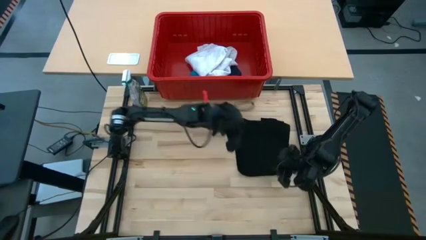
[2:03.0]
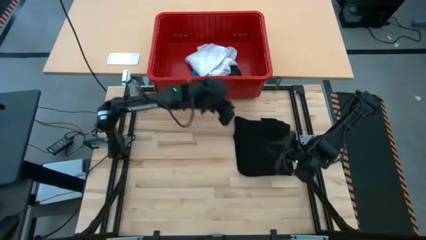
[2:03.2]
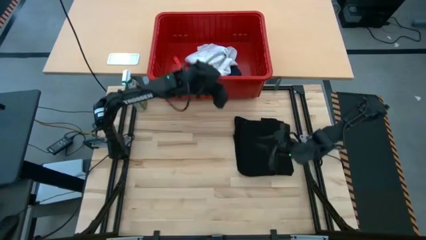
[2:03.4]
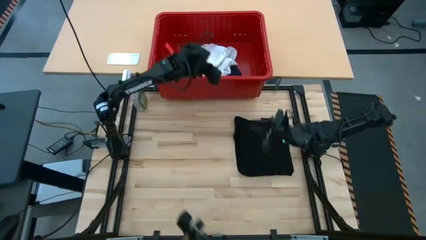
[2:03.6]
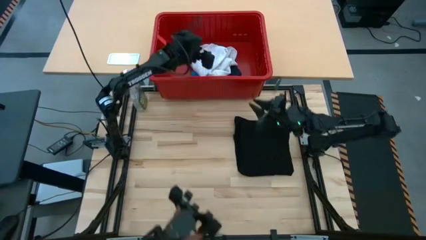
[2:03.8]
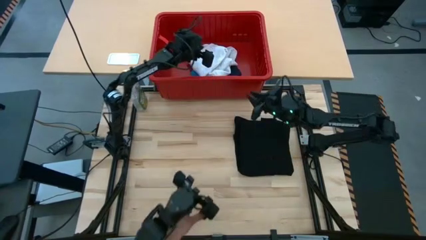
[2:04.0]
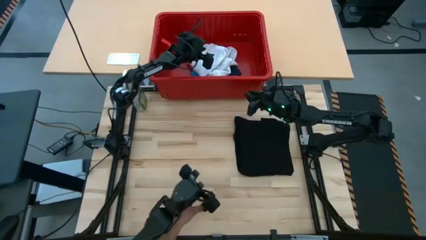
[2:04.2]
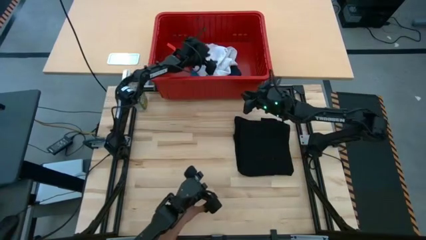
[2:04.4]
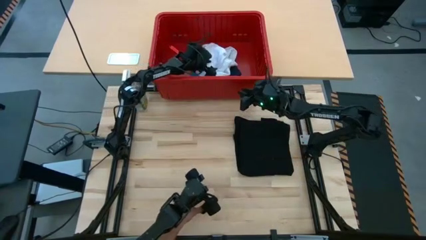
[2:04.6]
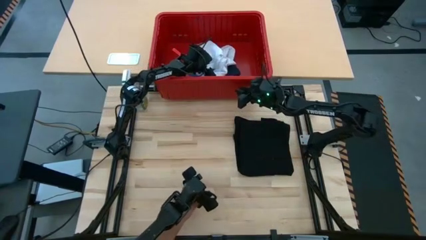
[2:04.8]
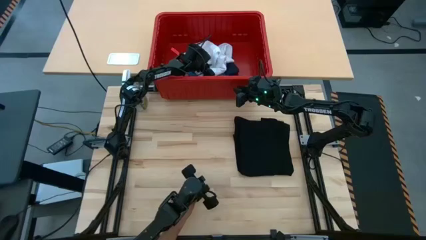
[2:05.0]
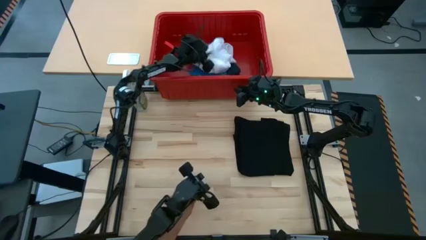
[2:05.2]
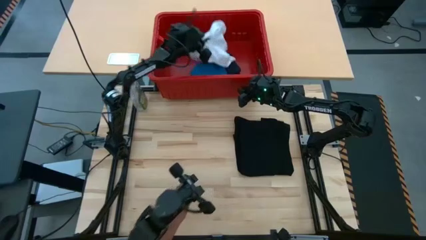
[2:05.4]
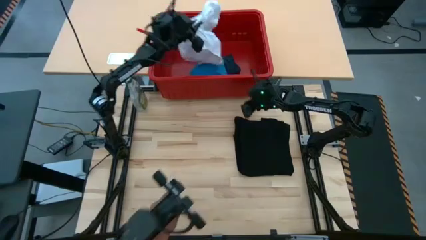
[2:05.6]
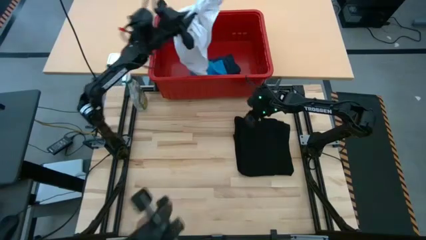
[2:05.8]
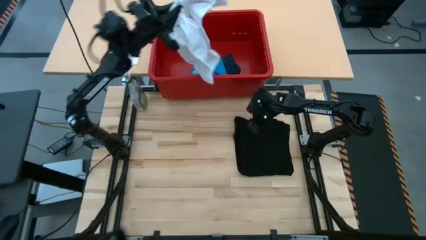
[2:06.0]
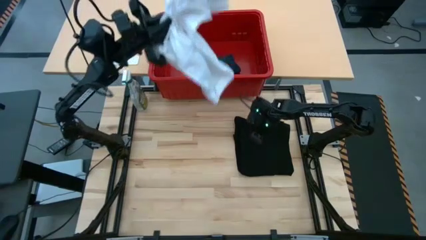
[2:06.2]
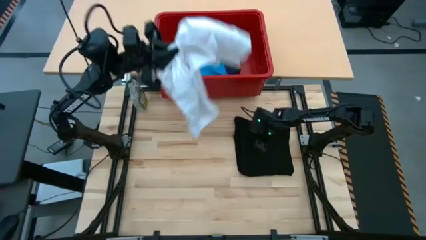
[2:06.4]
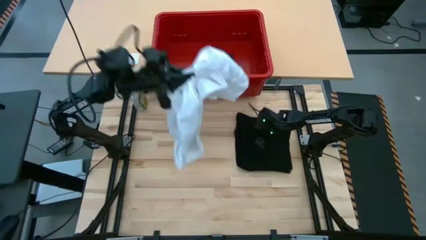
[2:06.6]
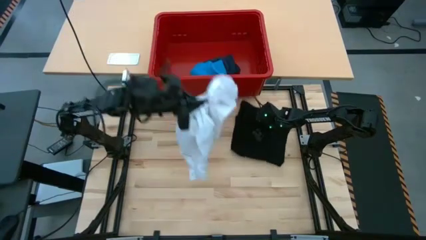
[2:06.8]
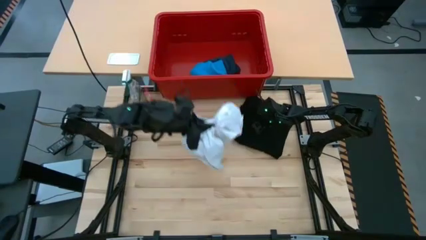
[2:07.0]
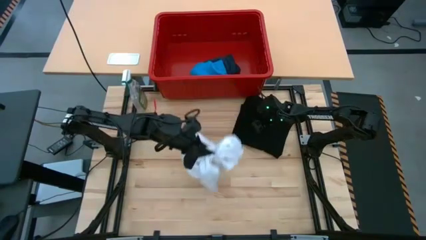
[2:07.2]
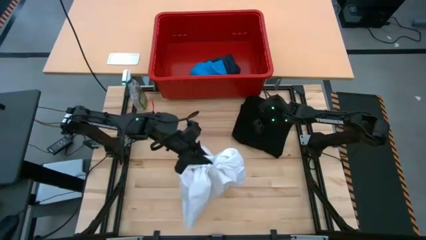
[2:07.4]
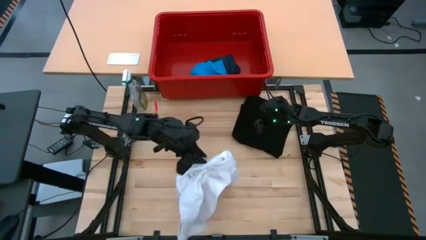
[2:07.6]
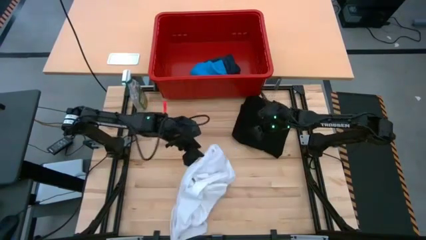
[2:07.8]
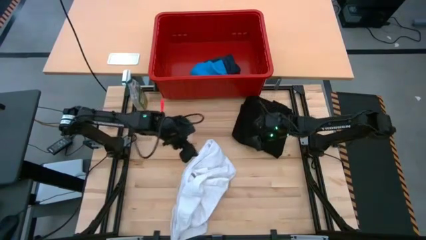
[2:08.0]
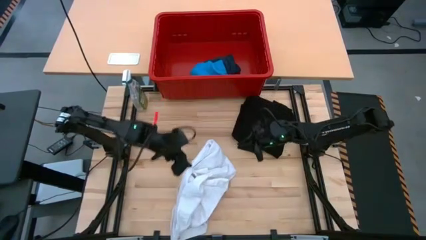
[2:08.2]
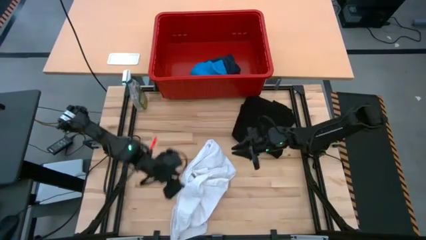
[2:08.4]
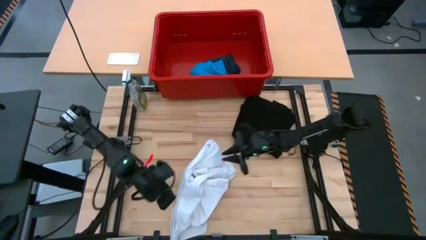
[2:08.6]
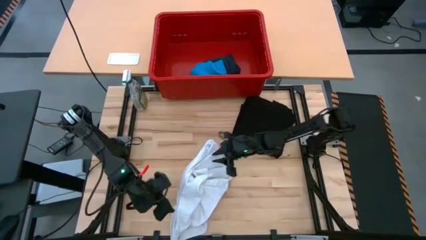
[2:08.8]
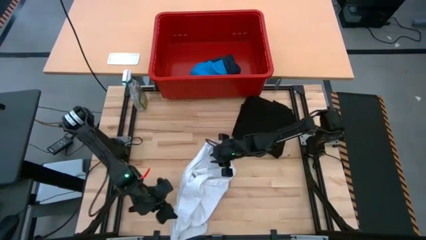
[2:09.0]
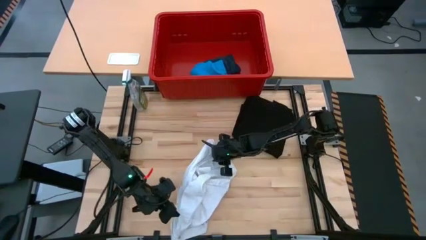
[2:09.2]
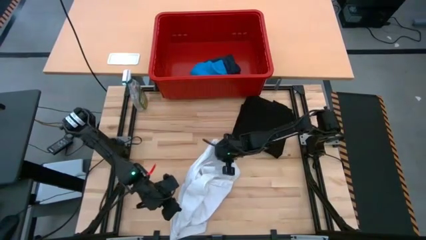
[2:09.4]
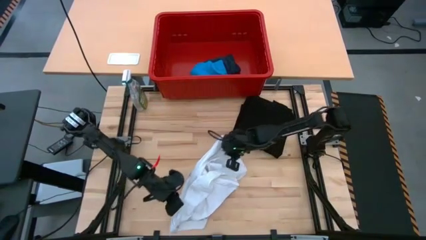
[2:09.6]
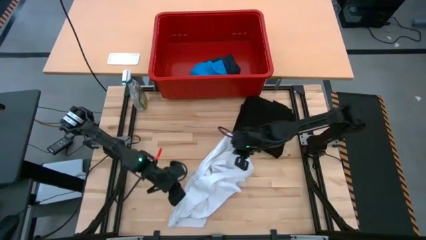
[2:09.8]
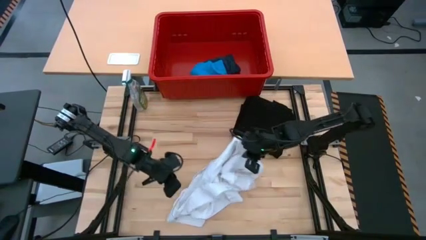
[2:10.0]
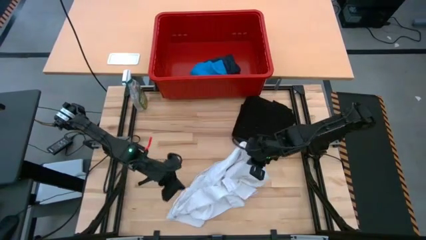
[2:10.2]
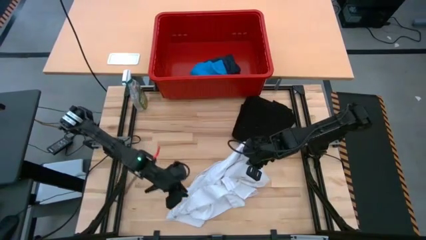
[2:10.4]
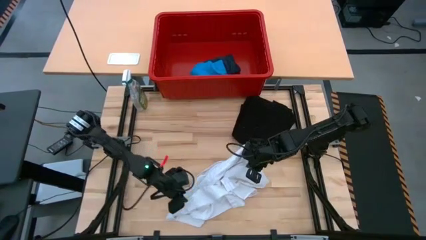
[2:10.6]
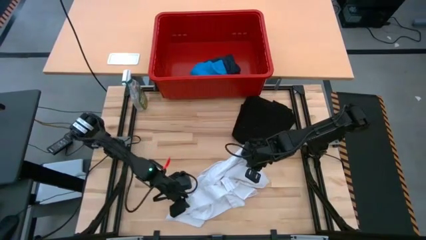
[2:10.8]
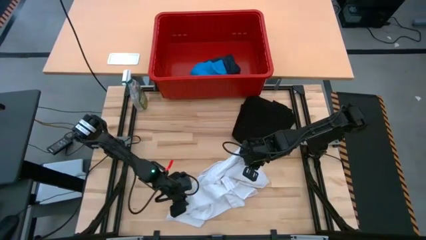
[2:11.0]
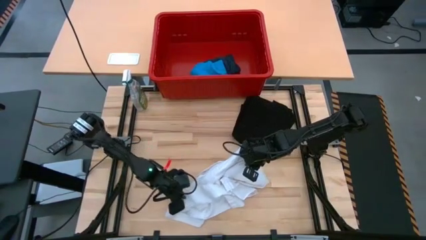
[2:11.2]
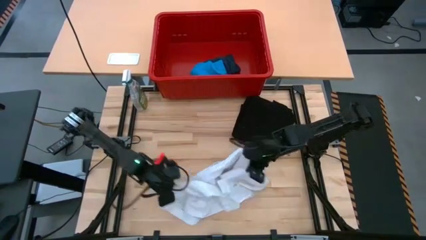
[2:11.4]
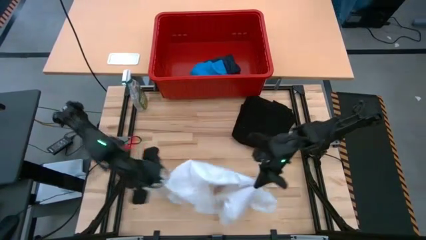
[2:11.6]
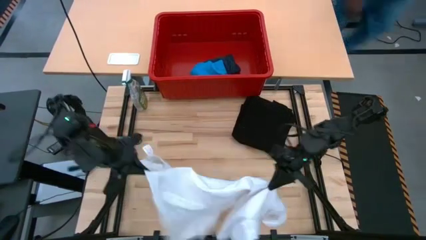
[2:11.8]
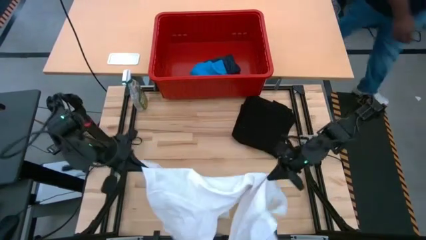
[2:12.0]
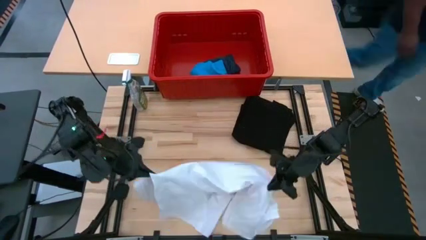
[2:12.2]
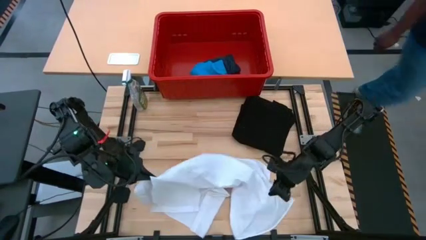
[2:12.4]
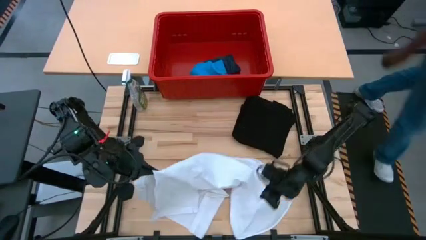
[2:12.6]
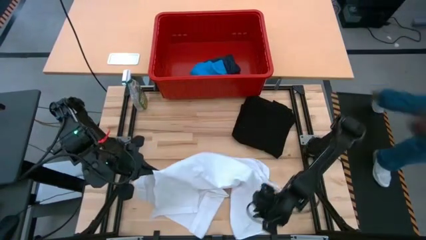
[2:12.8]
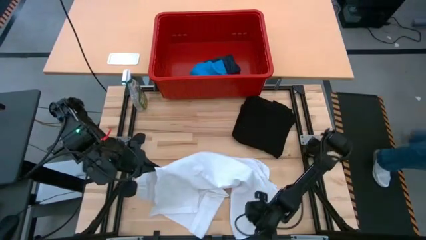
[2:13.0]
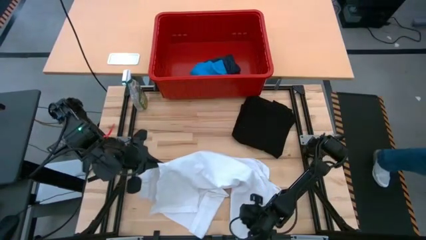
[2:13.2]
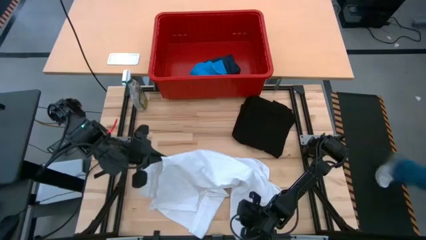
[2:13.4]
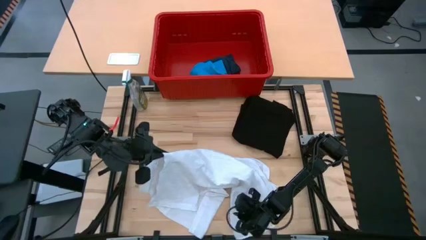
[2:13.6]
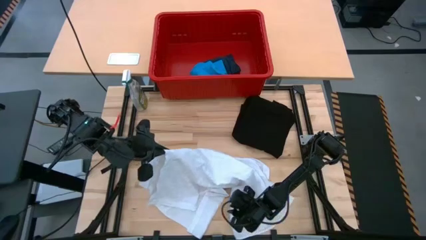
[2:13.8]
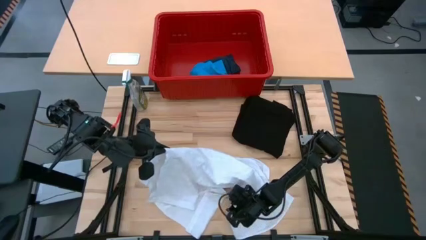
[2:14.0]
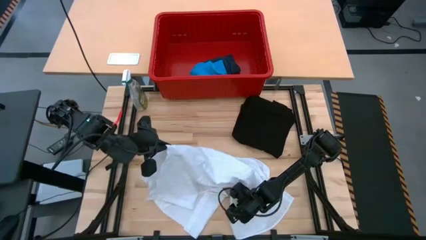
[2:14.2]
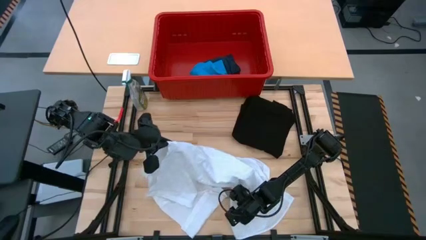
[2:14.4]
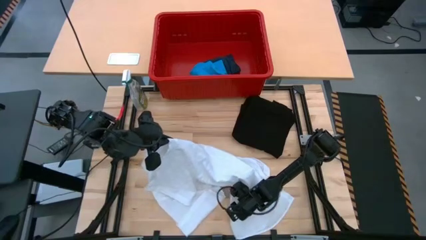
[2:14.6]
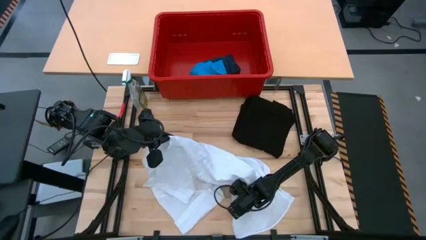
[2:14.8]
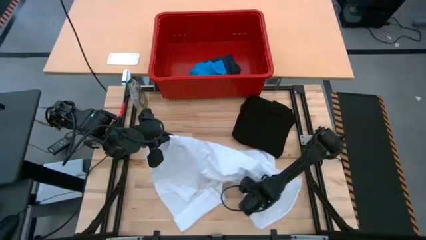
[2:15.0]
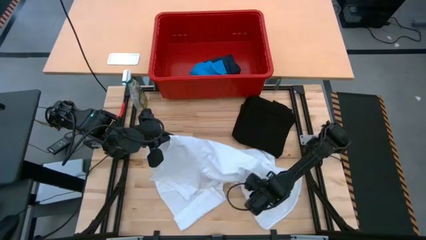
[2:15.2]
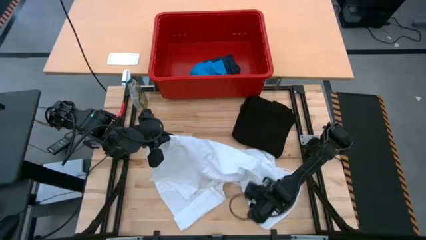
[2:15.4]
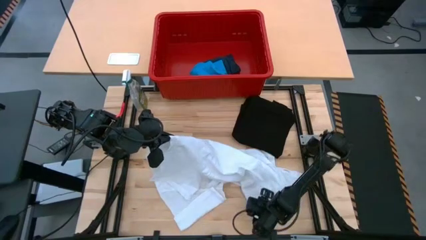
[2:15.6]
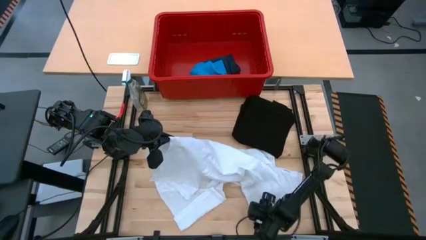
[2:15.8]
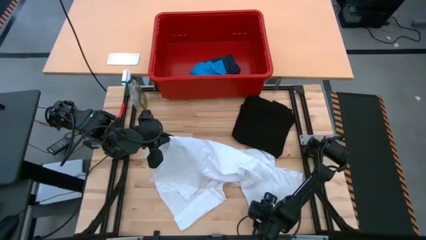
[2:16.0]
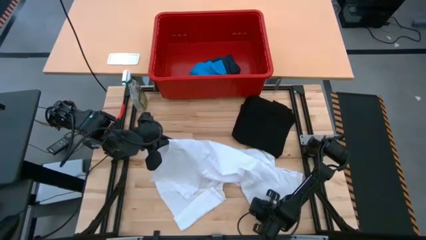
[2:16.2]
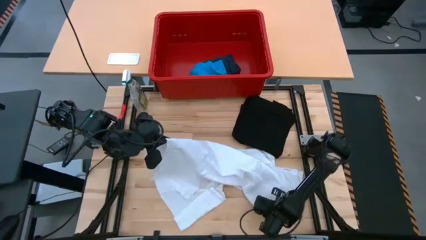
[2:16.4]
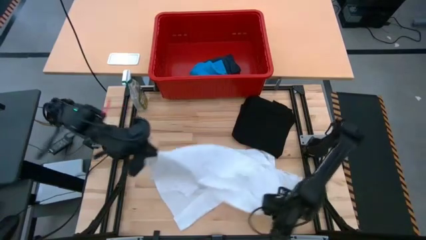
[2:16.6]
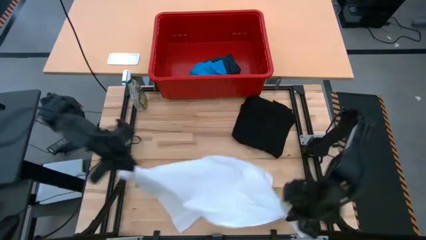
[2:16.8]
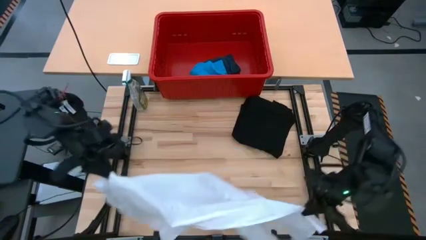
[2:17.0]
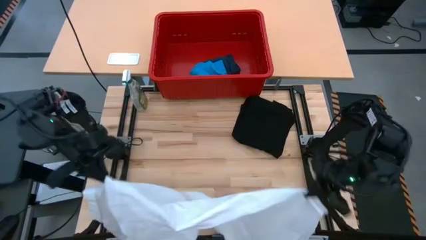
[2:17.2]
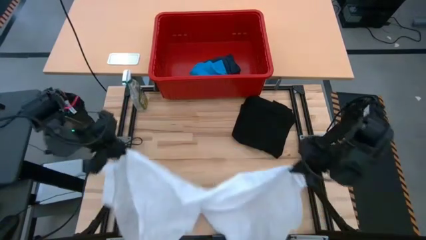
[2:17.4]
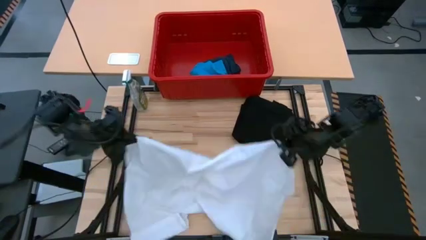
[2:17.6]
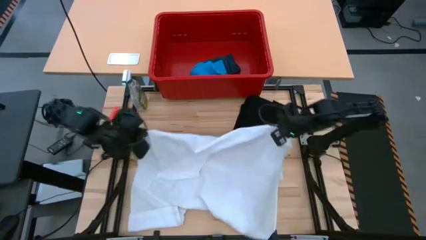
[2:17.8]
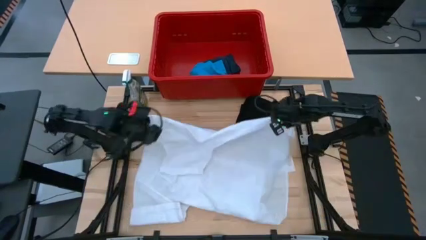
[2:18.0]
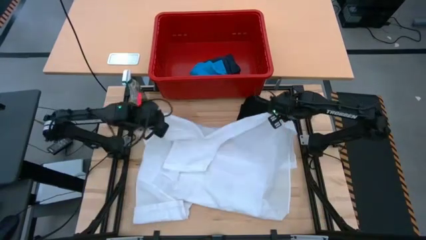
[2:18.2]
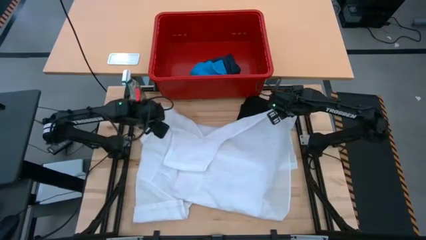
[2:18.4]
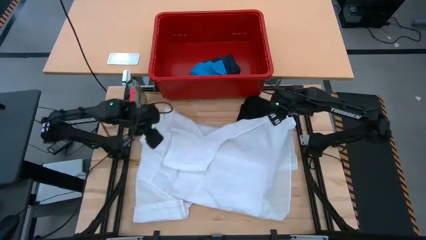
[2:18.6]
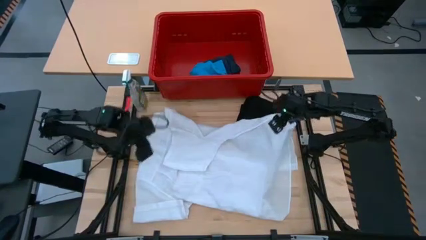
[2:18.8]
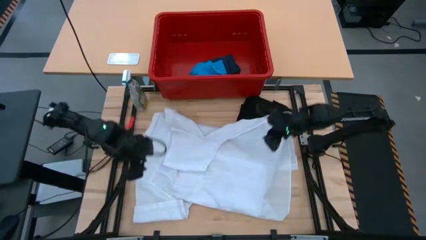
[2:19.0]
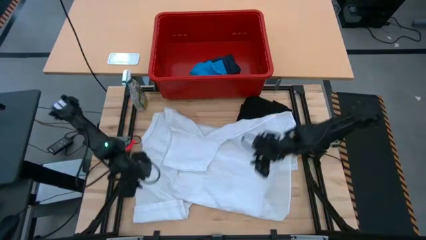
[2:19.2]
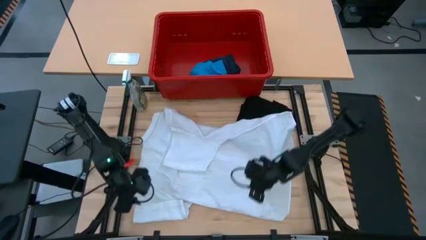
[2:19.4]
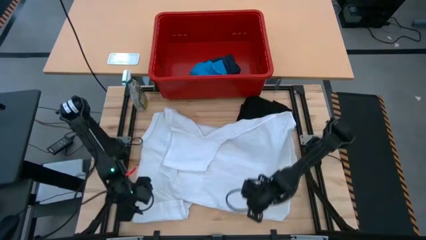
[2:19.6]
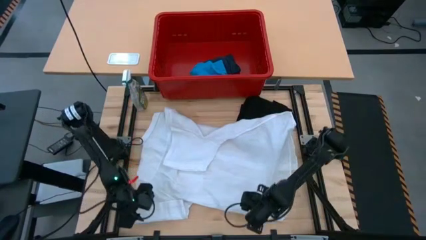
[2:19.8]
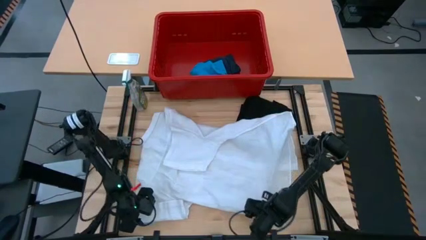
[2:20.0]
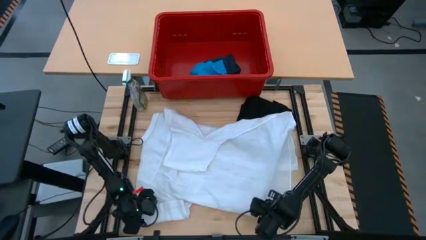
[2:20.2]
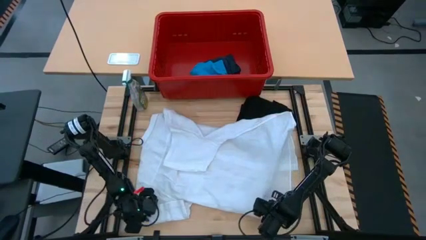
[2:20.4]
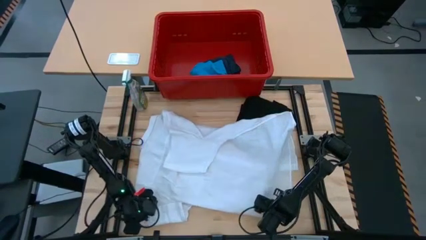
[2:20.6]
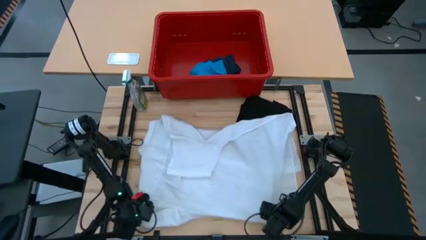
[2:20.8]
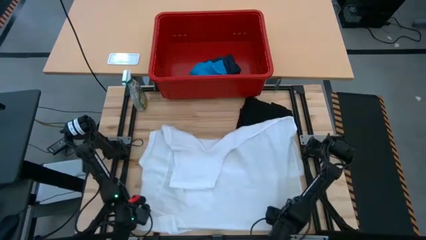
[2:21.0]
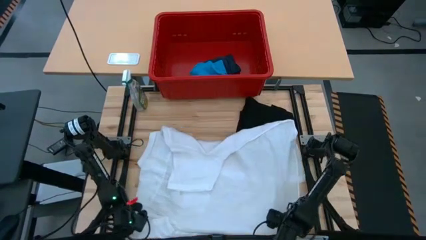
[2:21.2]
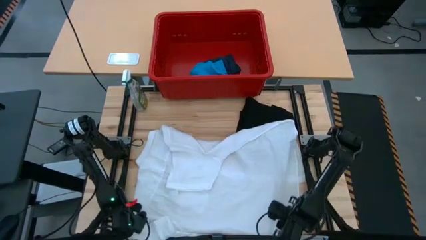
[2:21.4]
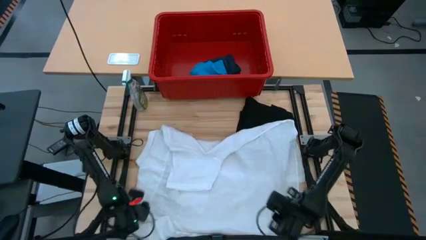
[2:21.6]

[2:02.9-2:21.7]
Task: Fold laundry
Fold the white polo shirt on the table
